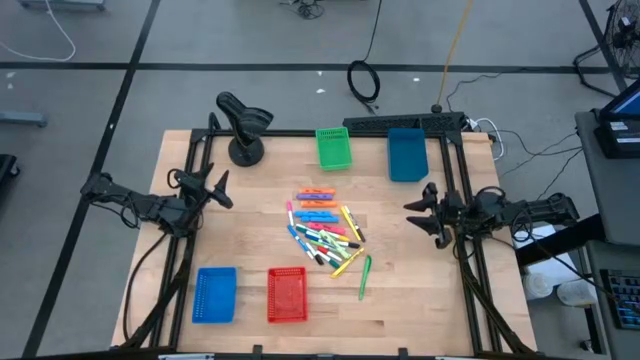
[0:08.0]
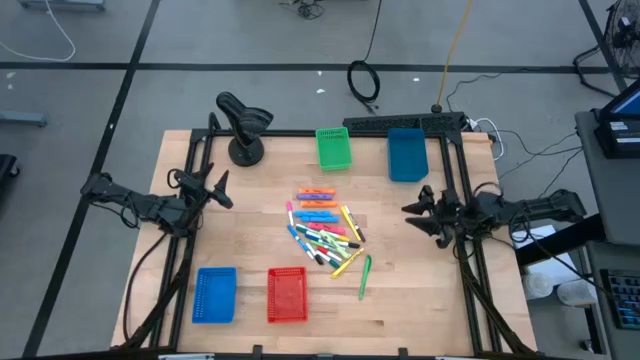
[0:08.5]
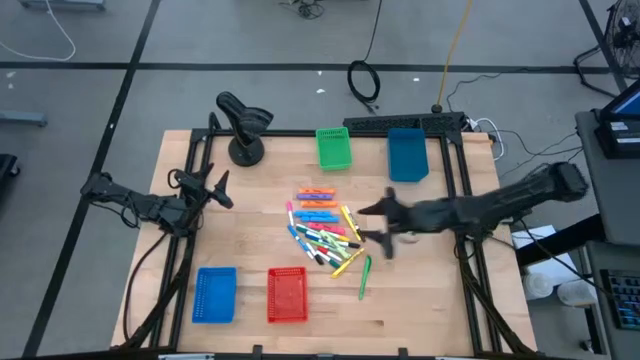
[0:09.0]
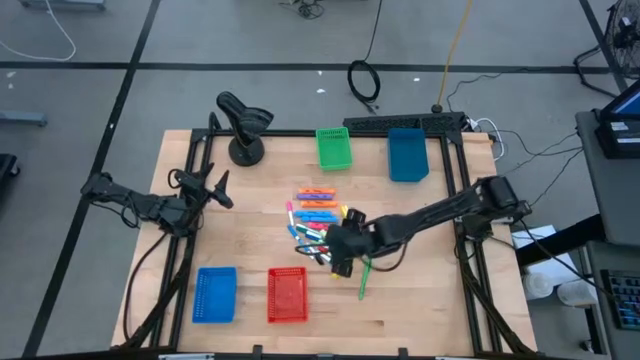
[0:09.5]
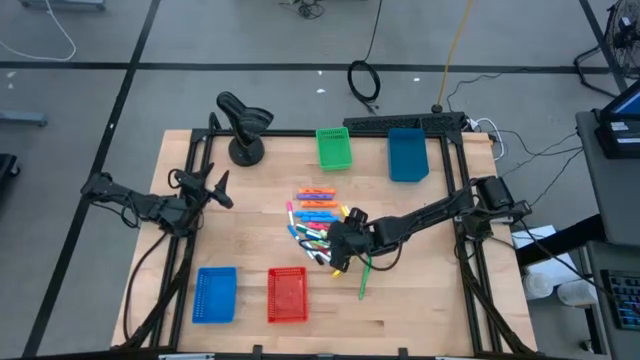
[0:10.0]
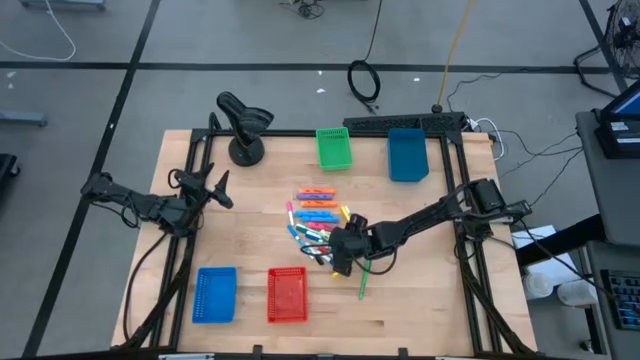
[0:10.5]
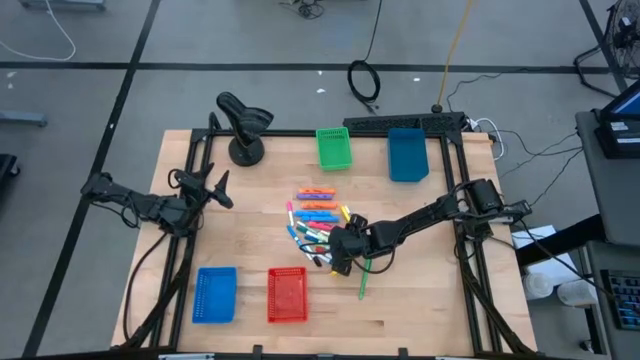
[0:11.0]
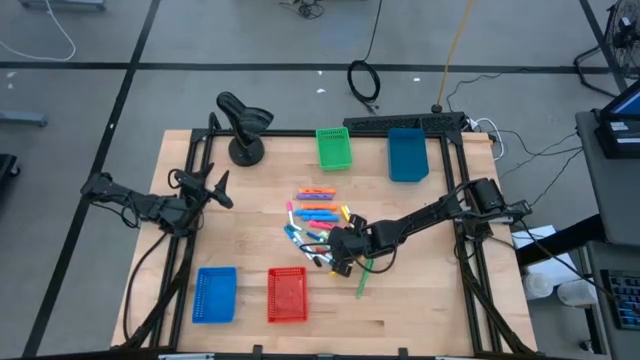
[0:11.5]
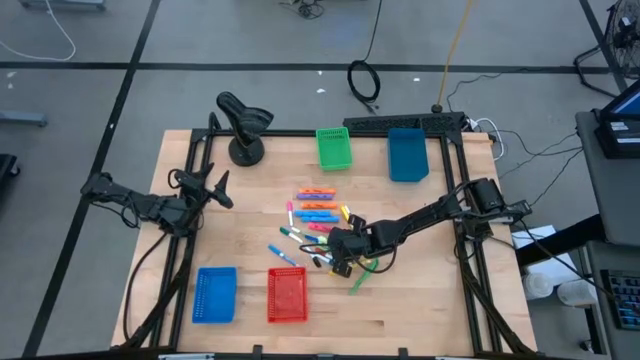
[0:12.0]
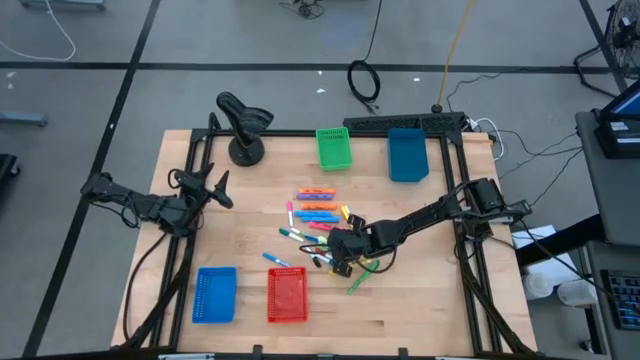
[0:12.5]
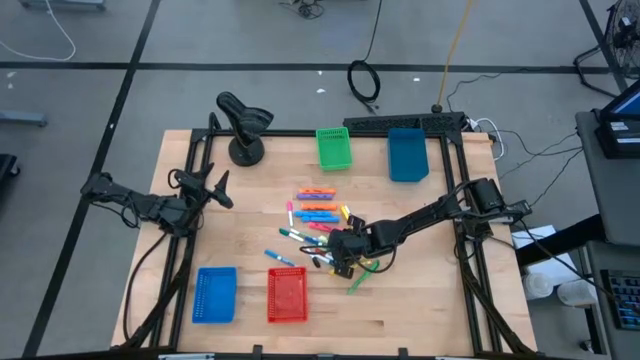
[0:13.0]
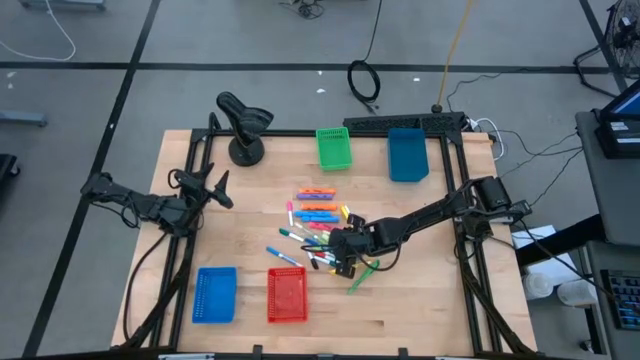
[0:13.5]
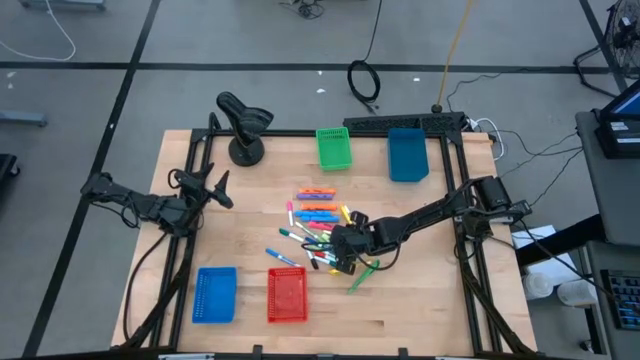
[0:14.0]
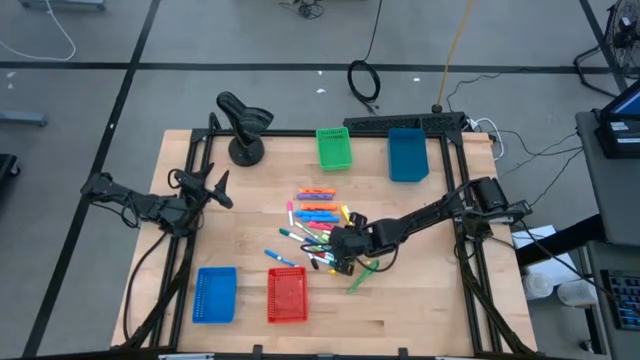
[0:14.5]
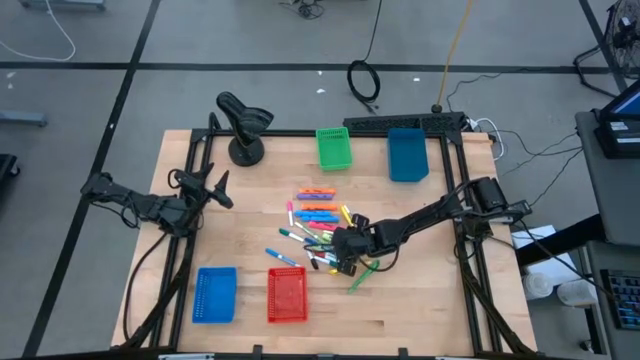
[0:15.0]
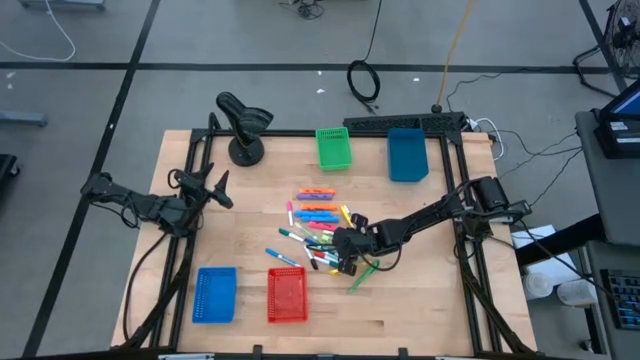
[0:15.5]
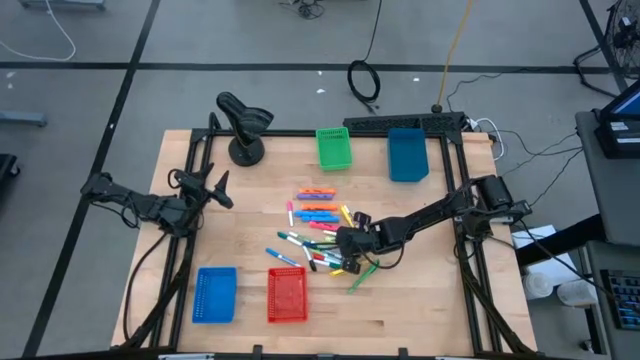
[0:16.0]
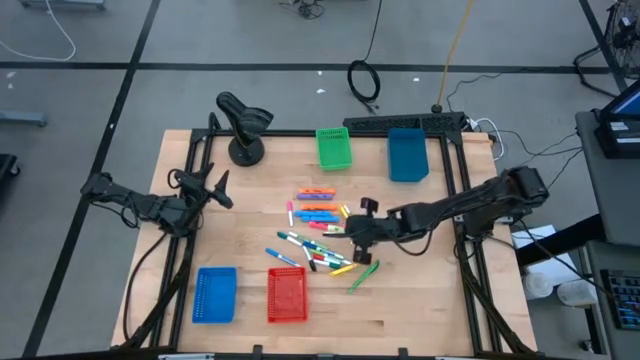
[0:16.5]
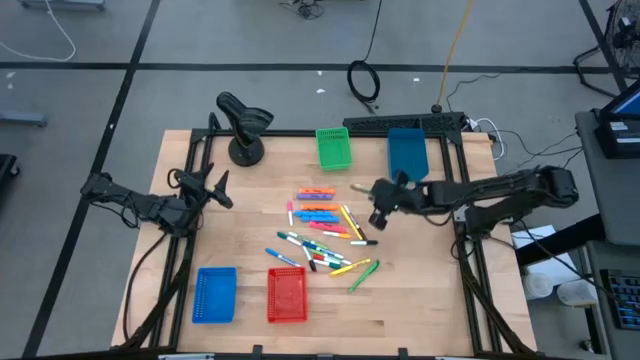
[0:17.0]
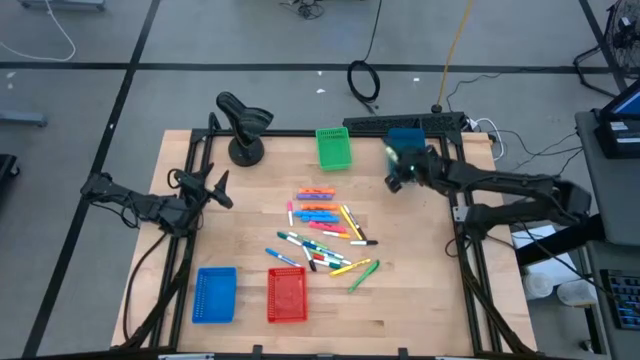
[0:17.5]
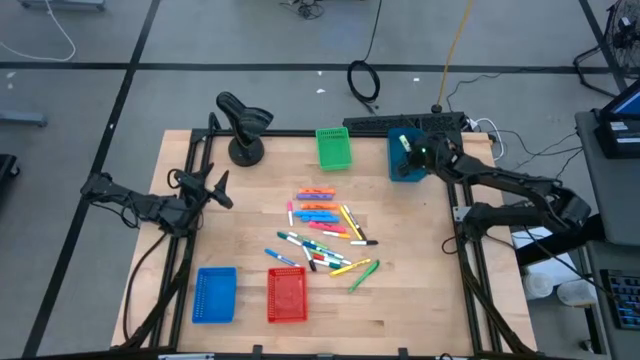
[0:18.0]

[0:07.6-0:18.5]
Task: Pick & Place Markers
Put the light green highlighter into the dark blue bin

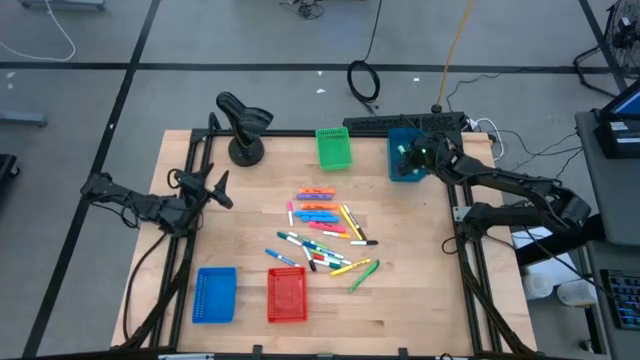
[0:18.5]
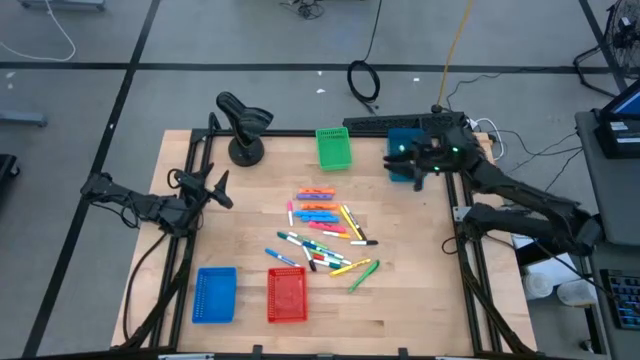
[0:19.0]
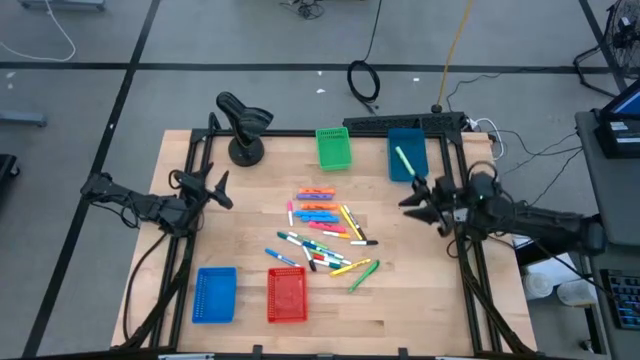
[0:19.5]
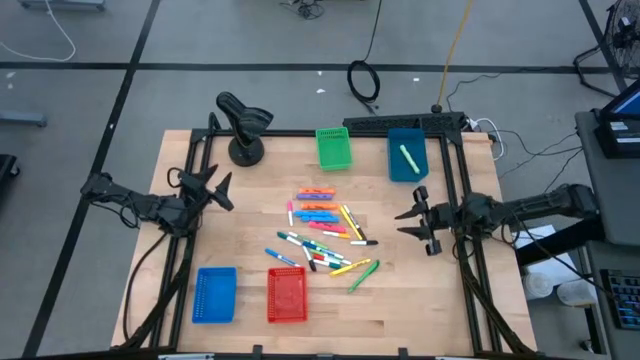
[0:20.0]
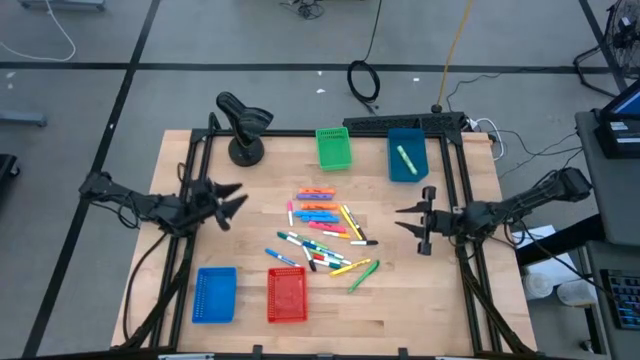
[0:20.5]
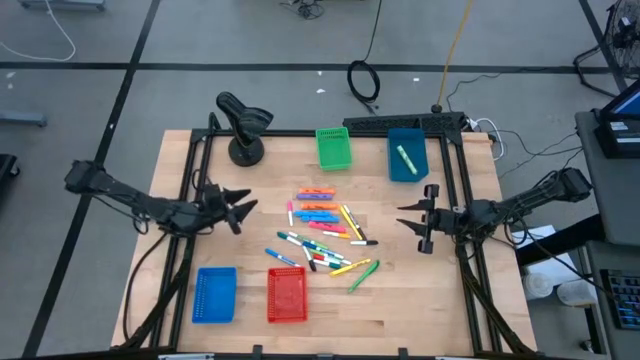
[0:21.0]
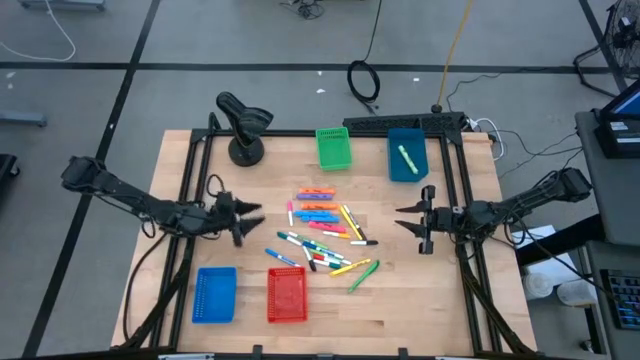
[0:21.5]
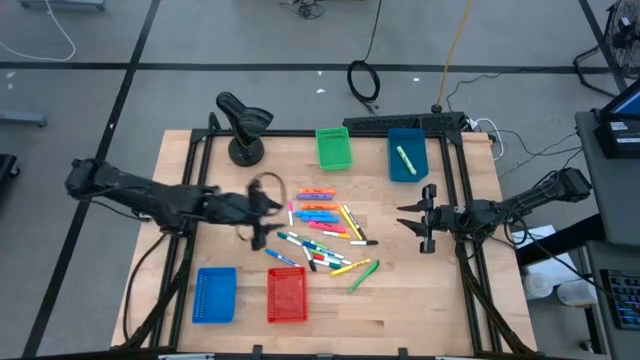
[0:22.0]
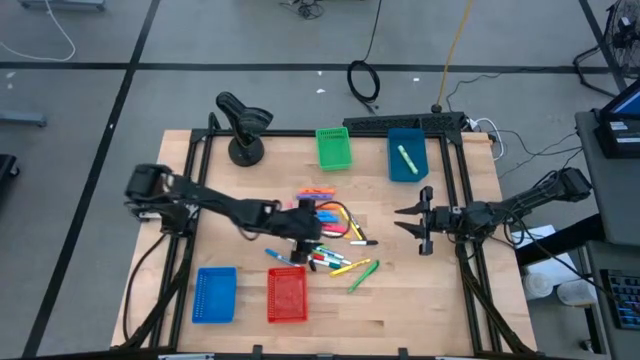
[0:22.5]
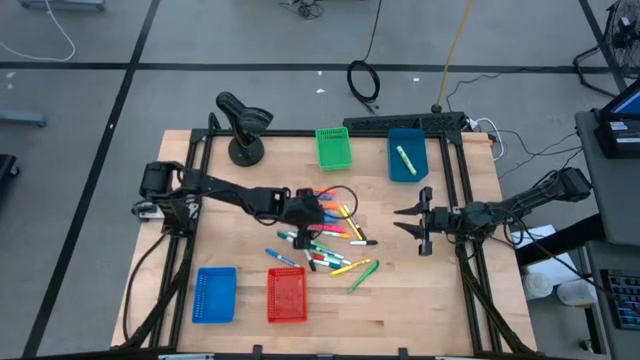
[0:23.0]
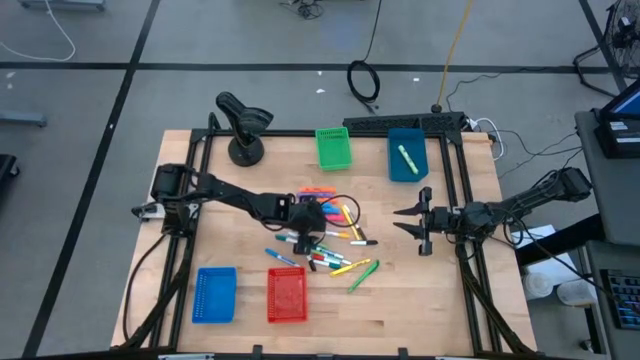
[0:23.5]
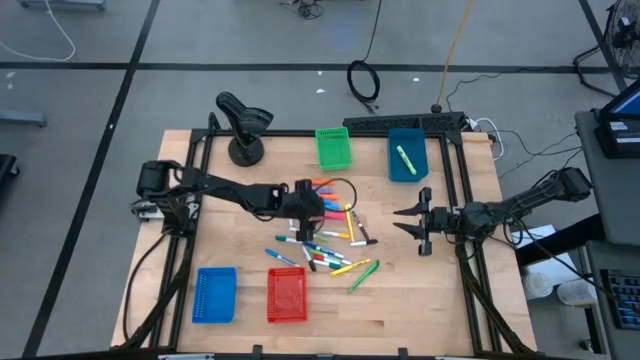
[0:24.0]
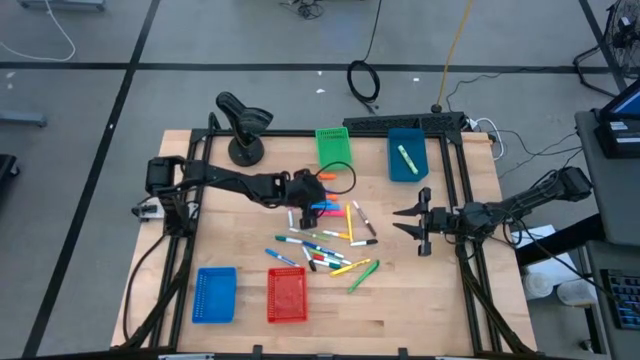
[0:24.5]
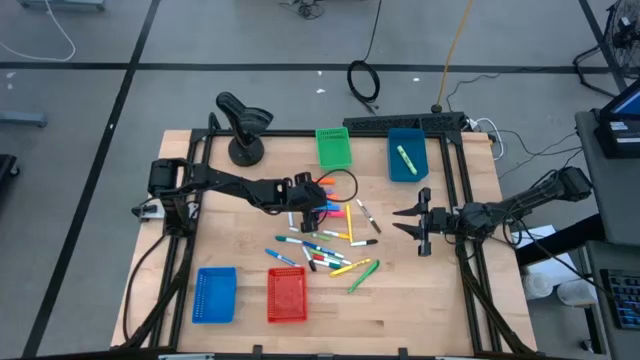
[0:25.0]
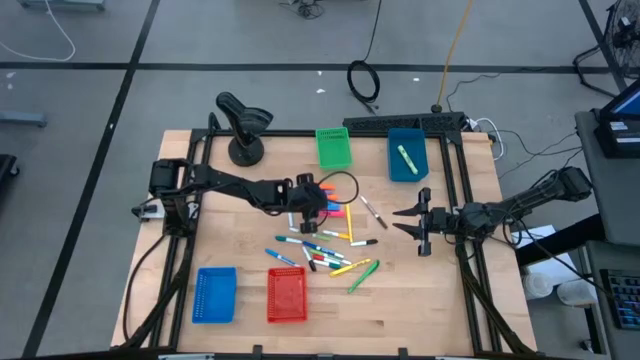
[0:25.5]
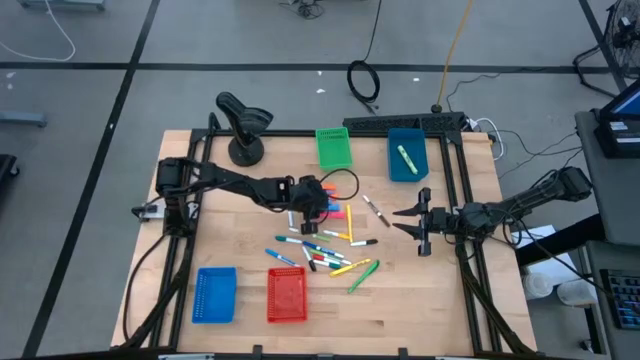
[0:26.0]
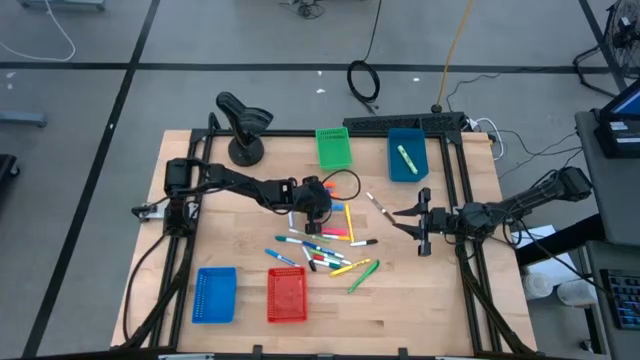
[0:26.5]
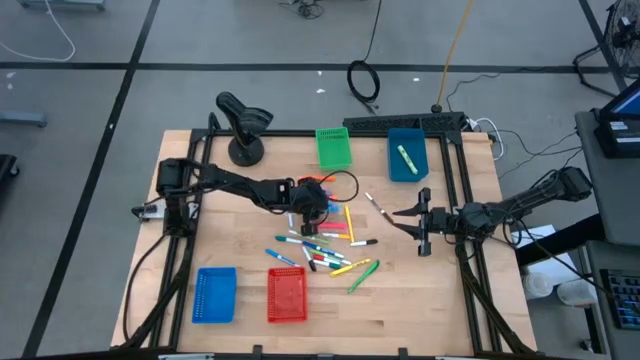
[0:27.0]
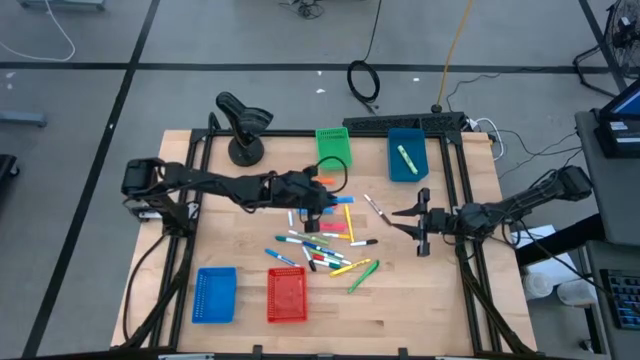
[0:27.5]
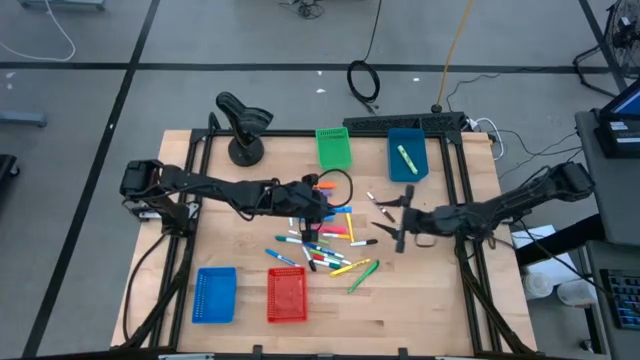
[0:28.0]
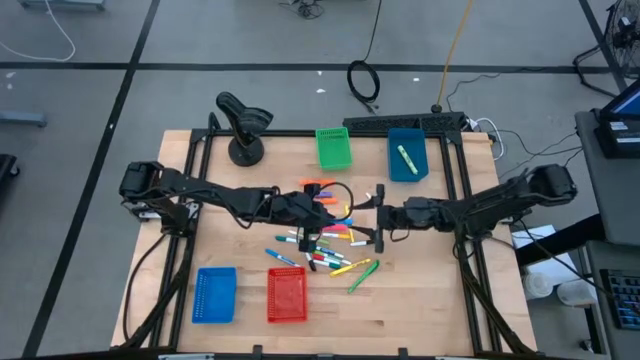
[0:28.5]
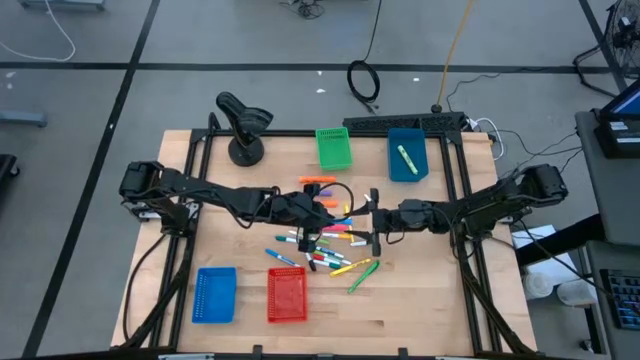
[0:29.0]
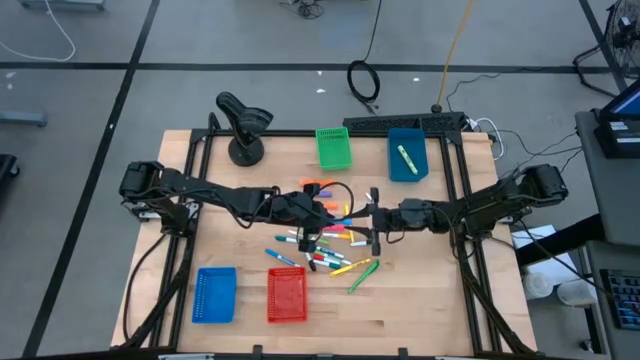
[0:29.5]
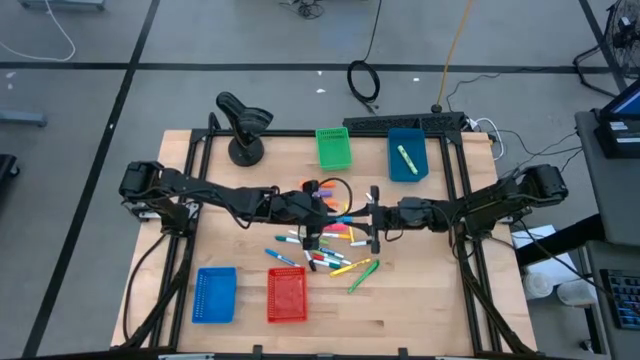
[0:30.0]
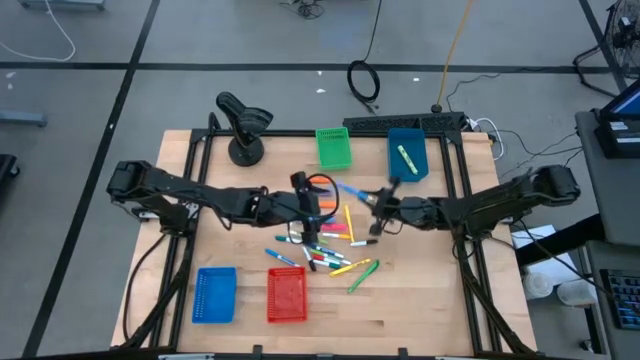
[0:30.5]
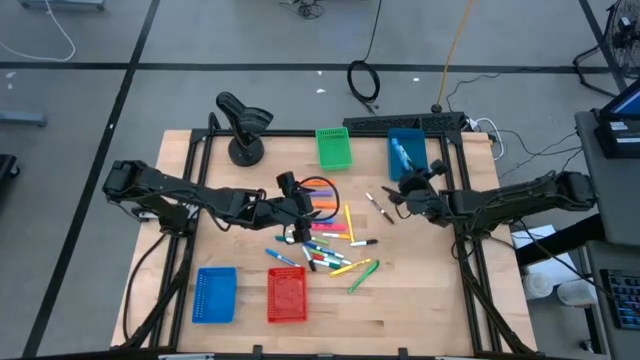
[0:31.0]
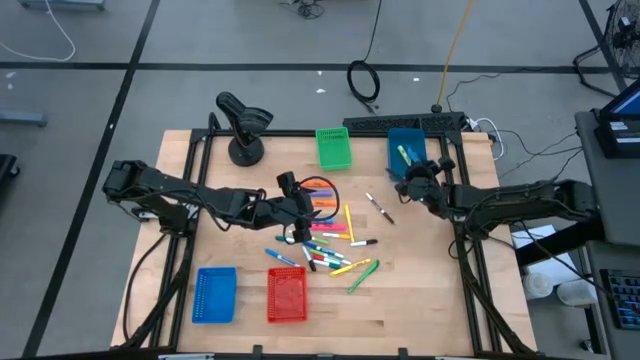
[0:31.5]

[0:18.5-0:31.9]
Put the bottom blue highlighter into the dark blue bin
